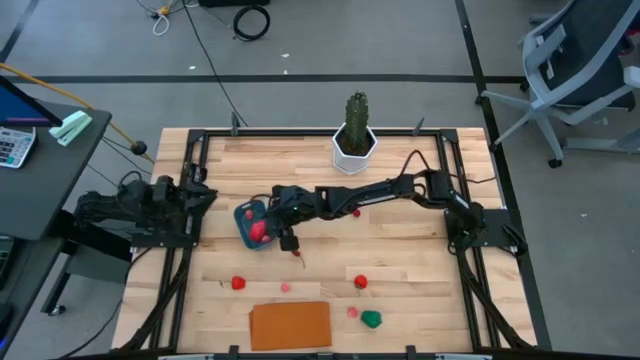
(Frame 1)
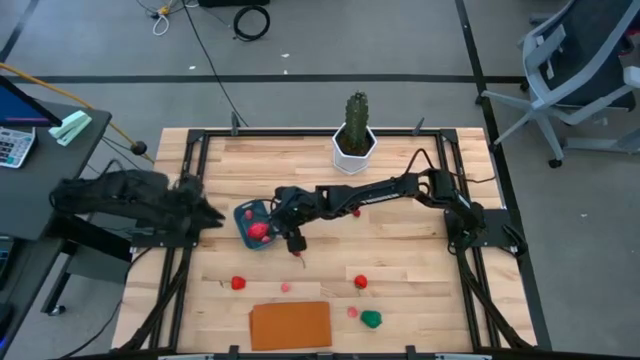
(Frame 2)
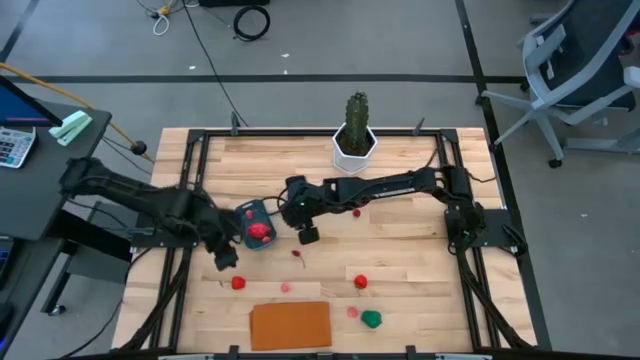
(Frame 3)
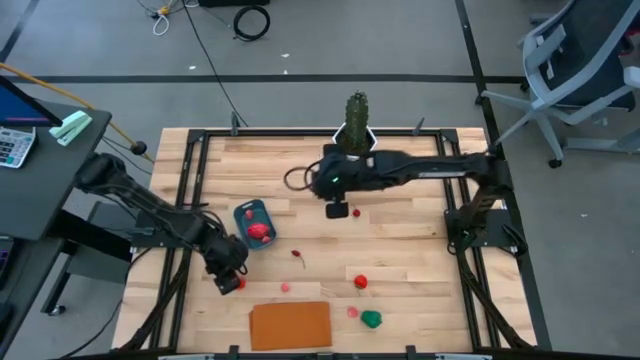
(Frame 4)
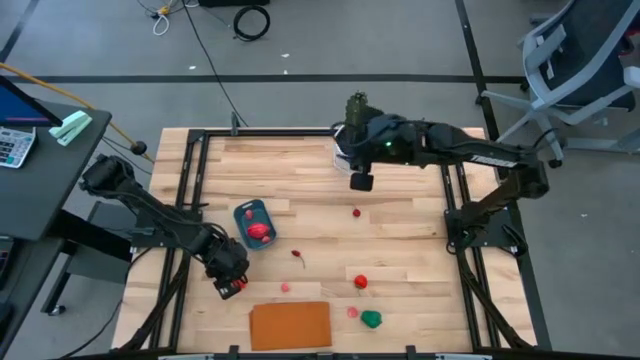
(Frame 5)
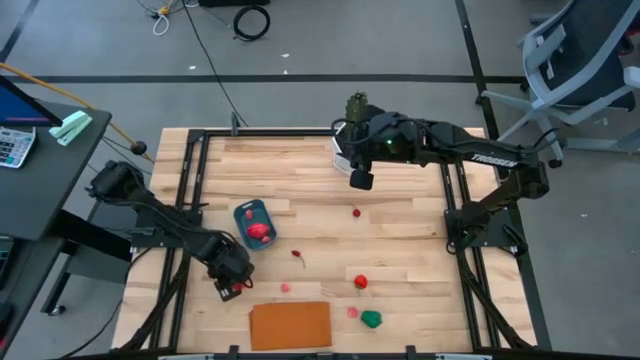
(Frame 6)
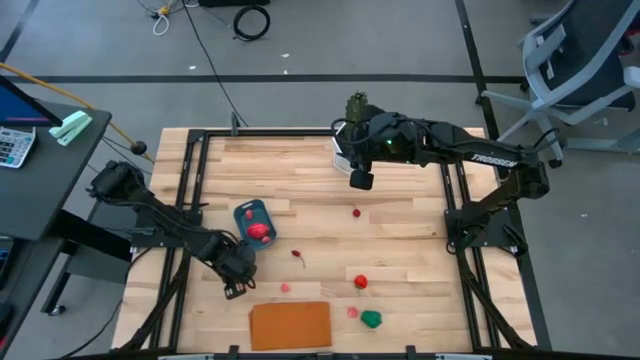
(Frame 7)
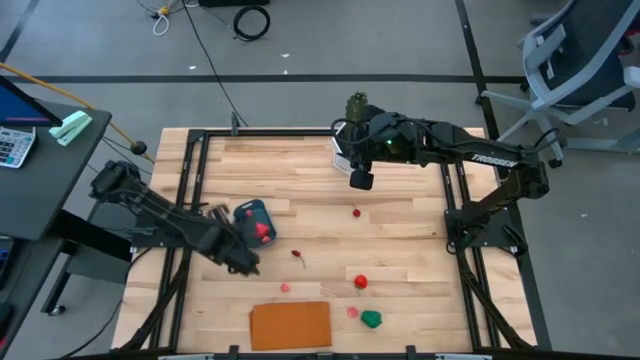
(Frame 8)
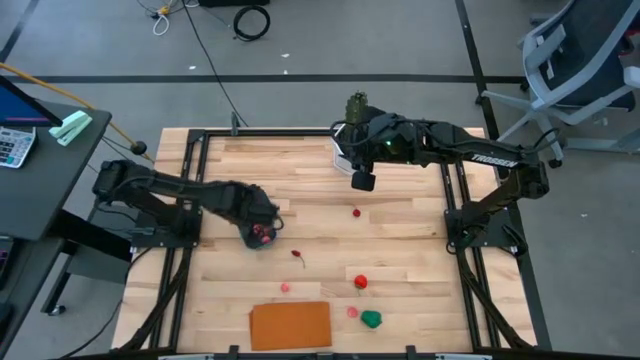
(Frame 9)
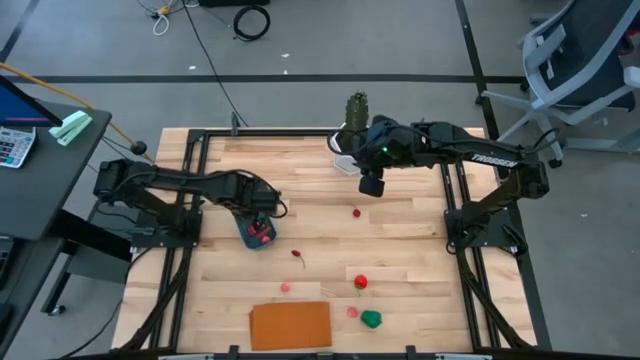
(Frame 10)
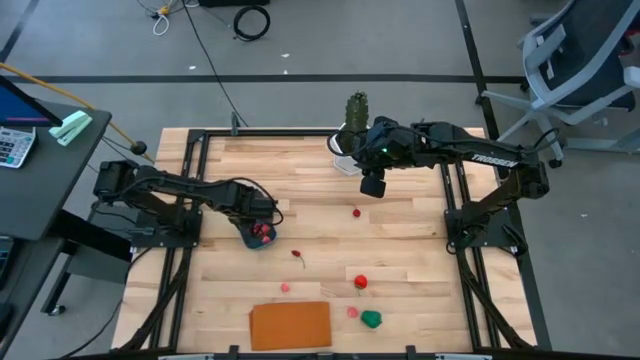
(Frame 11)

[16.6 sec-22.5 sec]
Task: Pick and placing Produce into tupperware
Put the strawberry into the blue bin

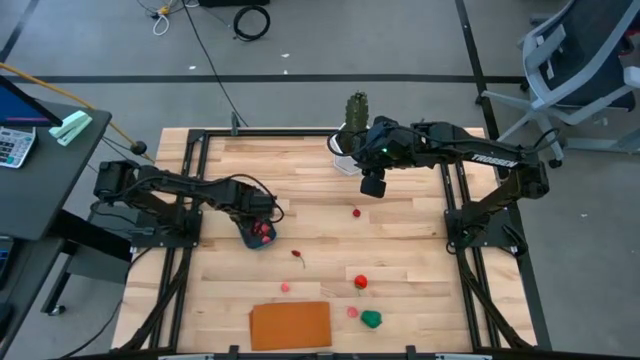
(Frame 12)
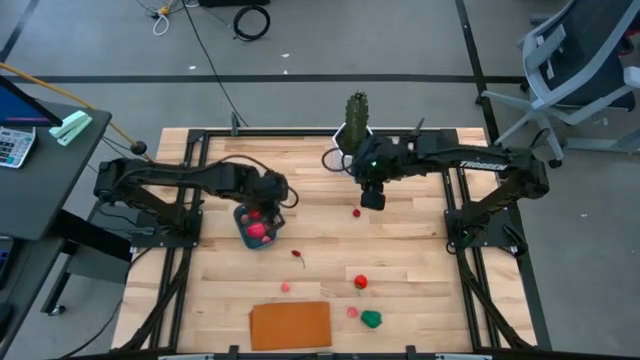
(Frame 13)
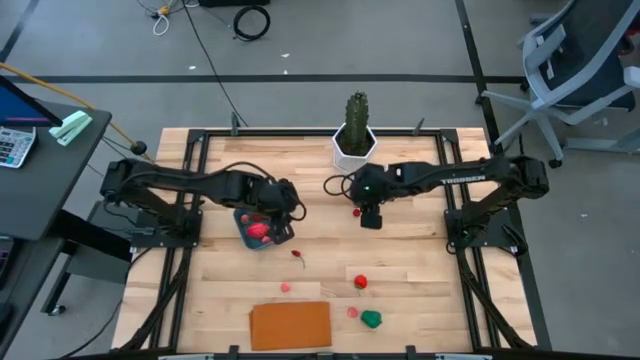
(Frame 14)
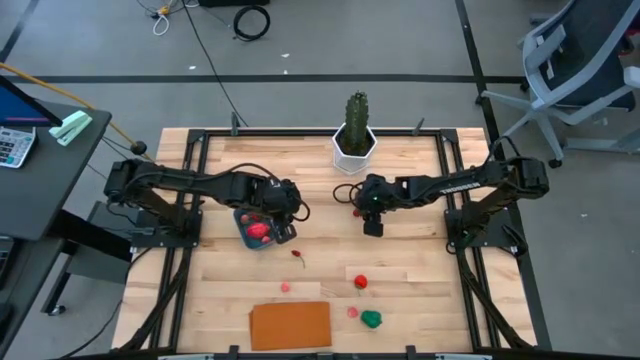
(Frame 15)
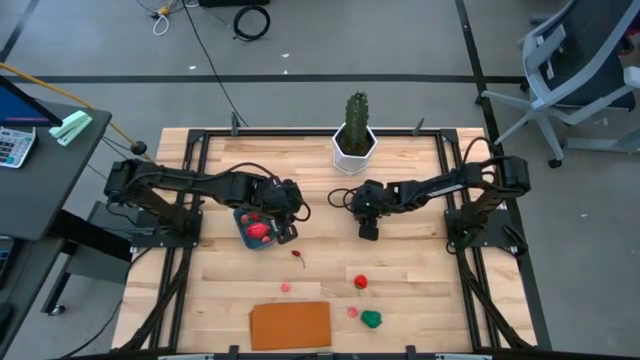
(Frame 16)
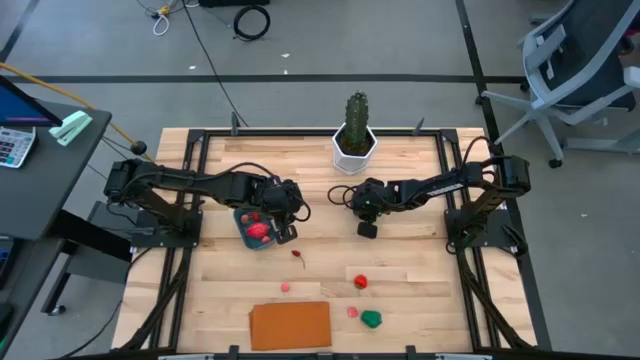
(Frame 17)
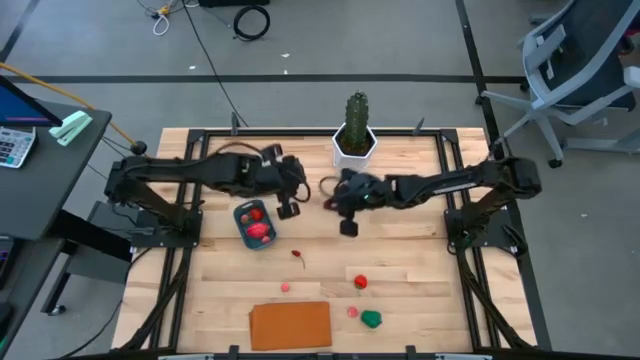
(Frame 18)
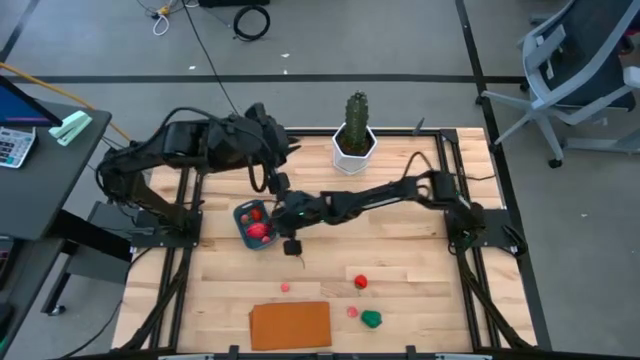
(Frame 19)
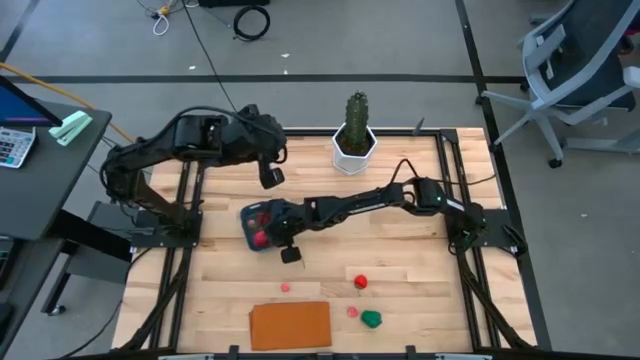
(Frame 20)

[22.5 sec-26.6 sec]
Put the cherry into the blue bin

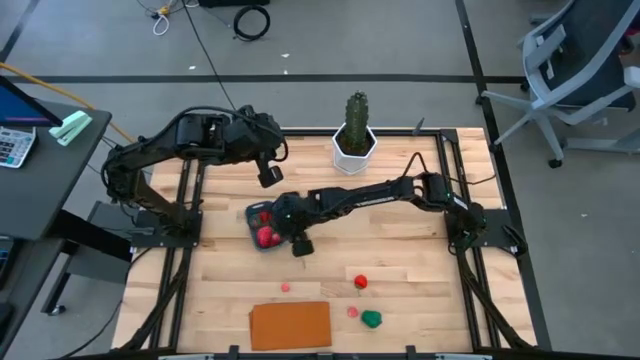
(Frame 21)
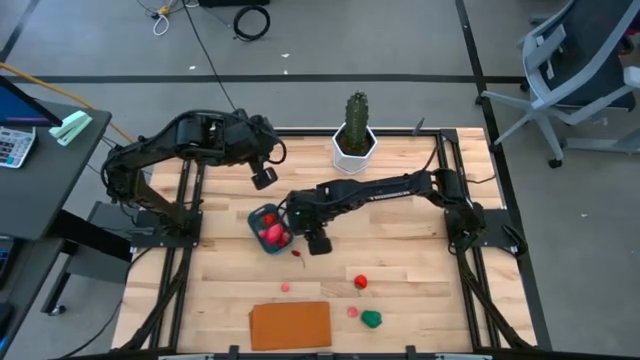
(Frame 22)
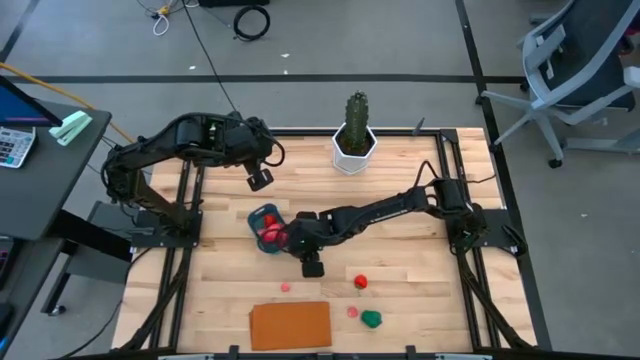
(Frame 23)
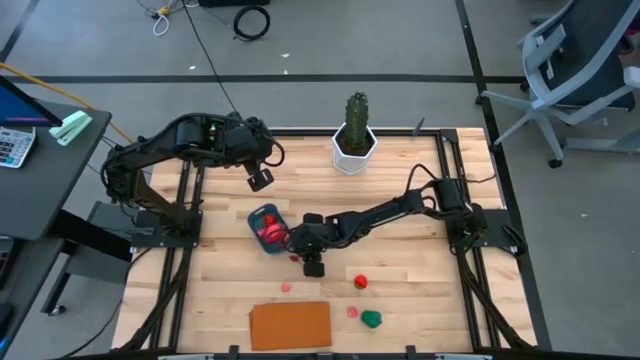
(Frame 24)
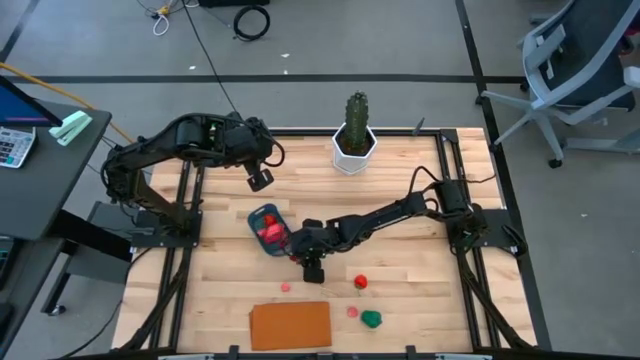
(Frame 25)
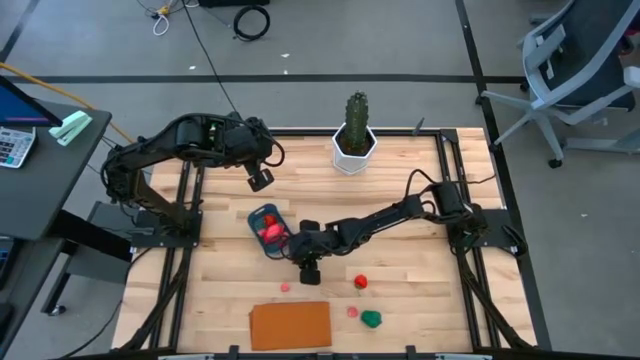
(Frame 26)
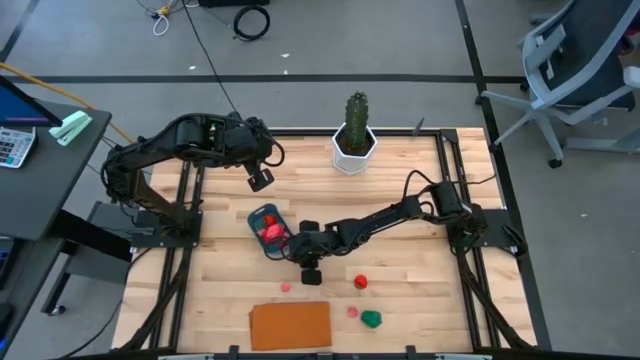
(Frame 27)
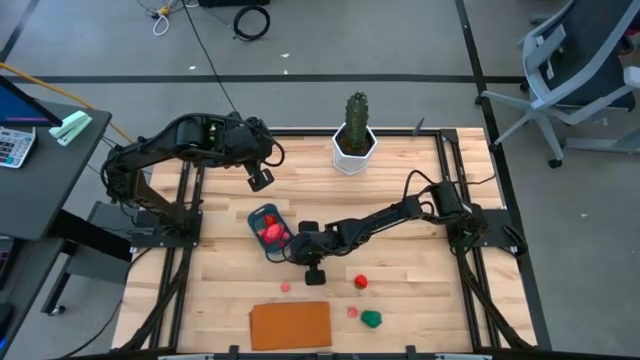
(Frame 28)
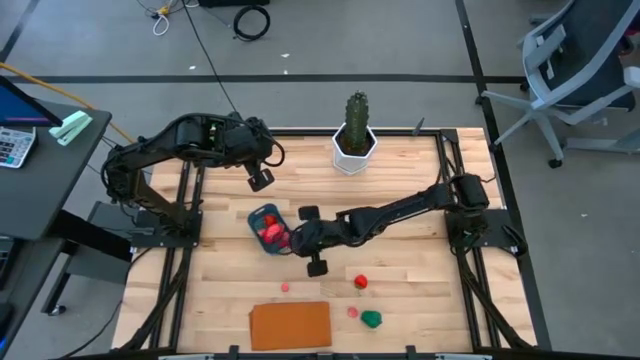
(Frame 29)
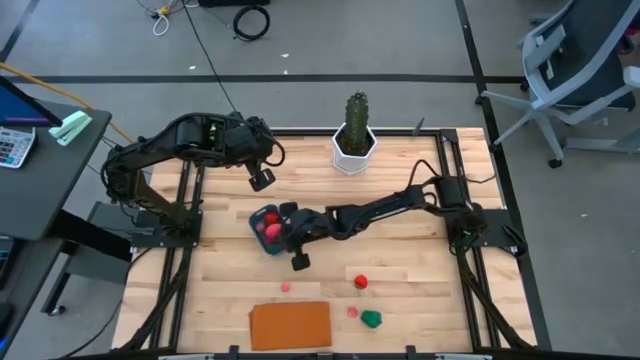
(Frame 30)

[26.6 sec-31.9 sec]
Put the cherry into the blue bin

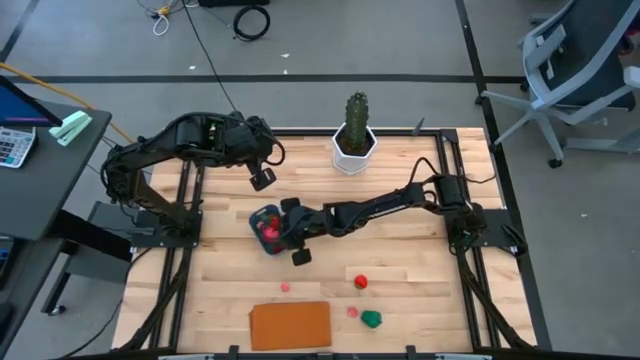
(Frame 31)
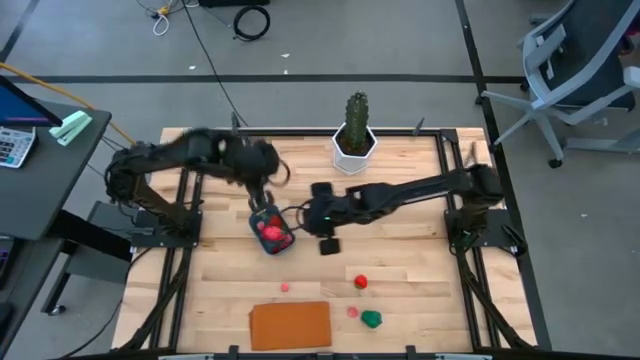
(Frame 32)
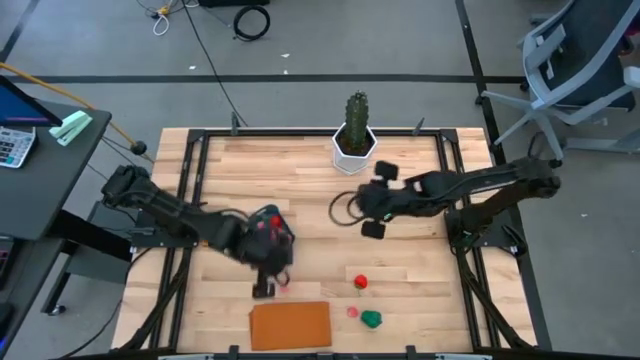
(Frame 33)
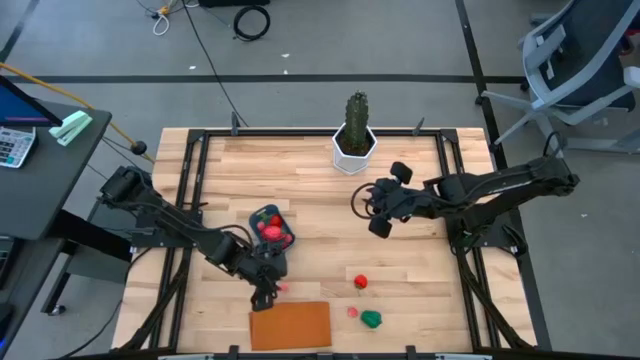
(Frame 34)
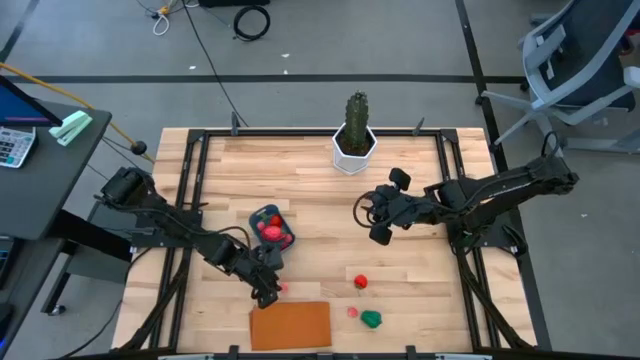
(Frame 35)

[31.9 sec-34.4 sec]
Put the peach into the blue bin

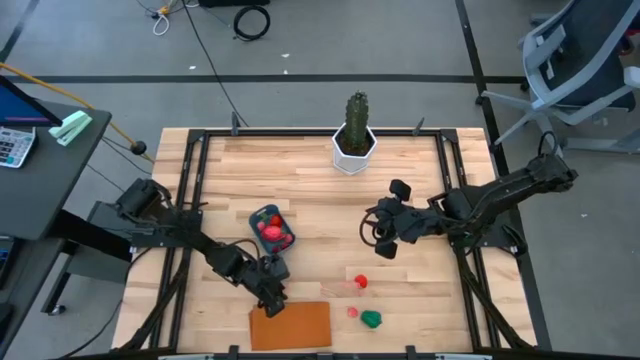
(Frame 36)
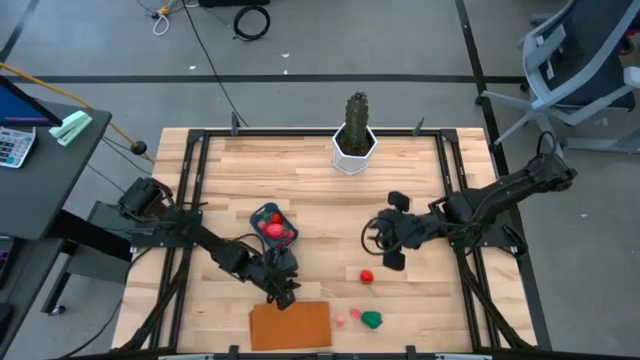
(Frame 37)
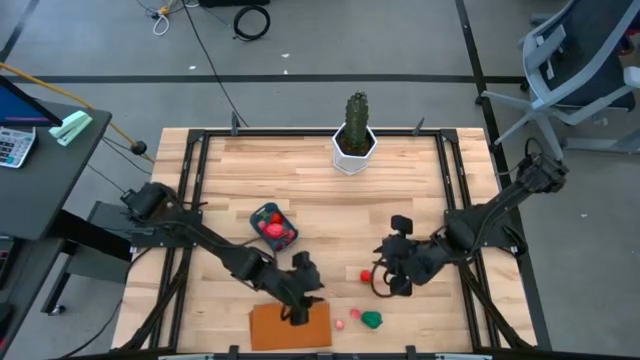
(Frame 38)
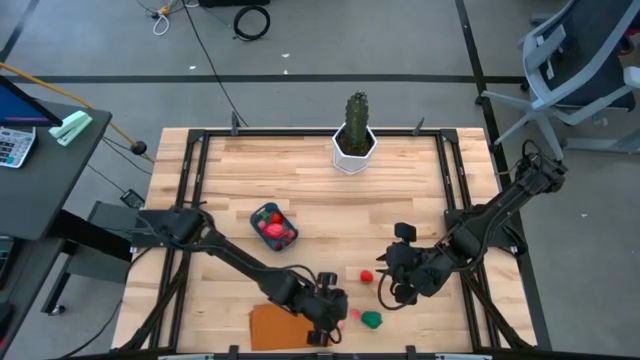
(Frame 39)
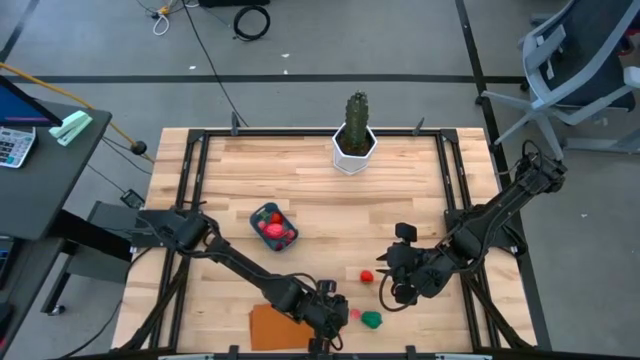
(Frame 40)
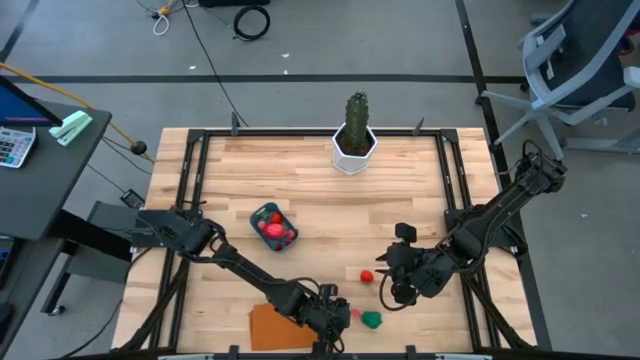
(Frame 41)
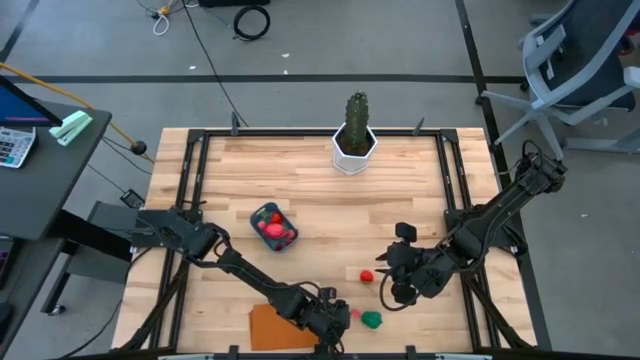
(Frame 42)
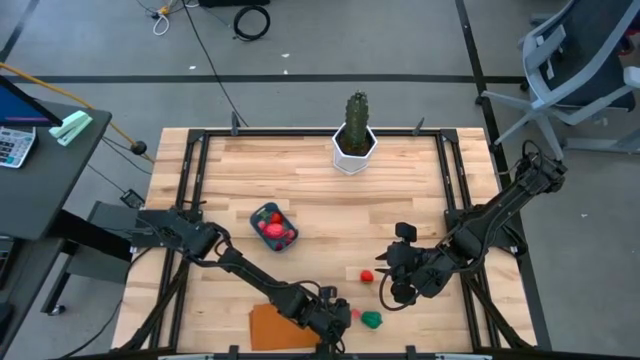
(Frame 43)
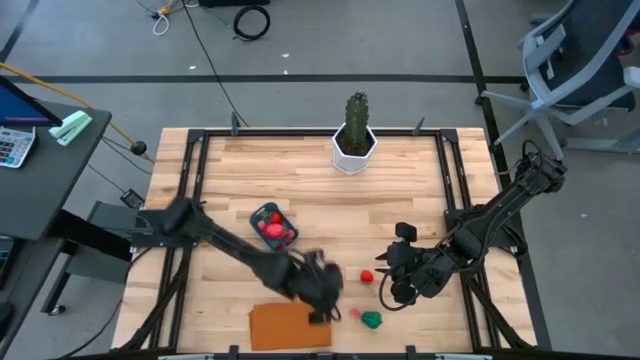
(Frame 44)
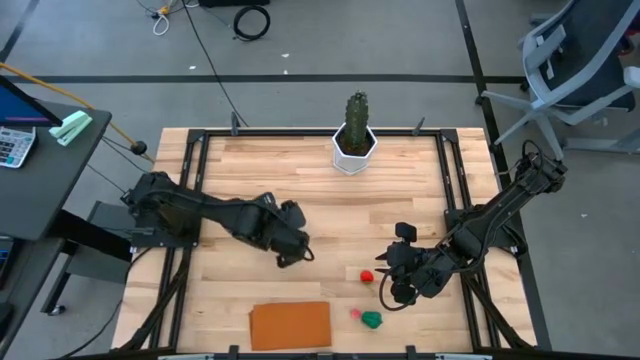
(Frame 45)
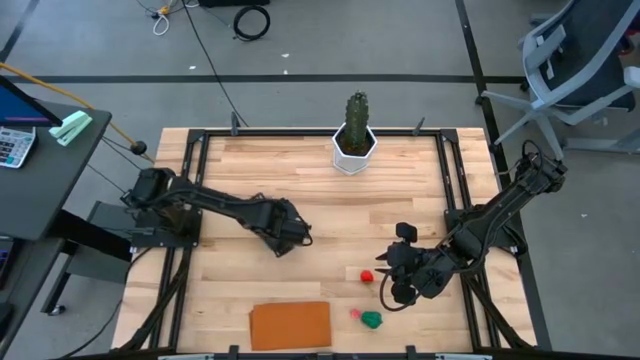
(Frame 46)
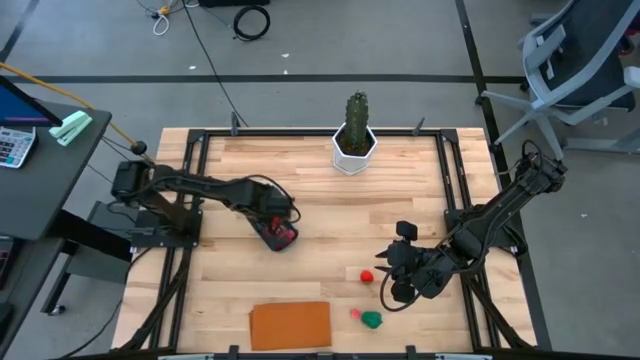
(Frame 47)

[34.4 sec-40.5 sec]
Put the peach into the blue bin
